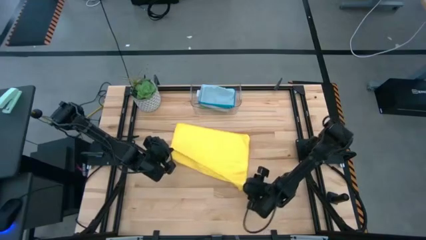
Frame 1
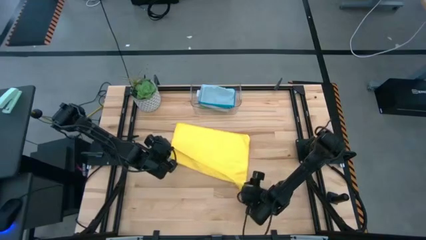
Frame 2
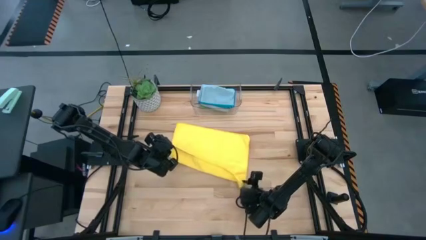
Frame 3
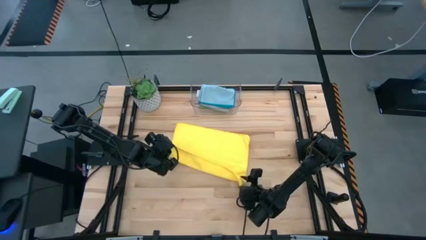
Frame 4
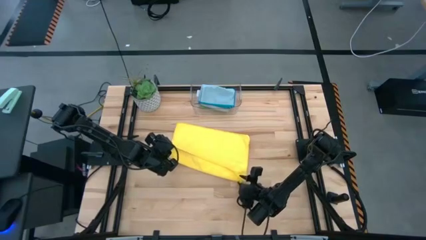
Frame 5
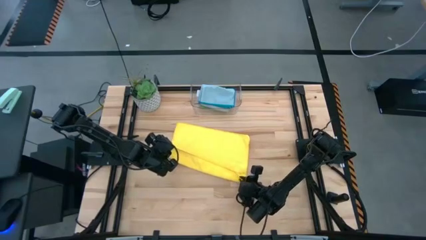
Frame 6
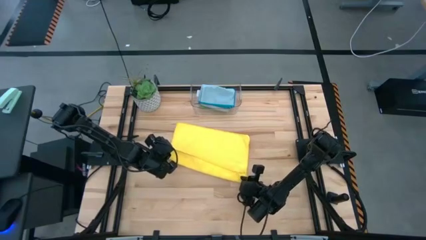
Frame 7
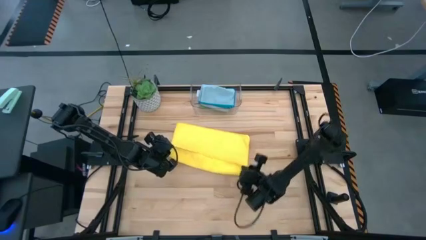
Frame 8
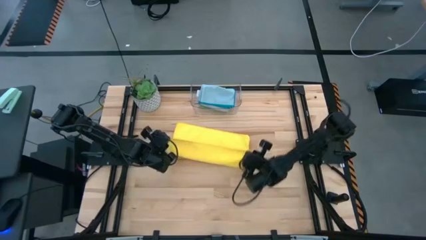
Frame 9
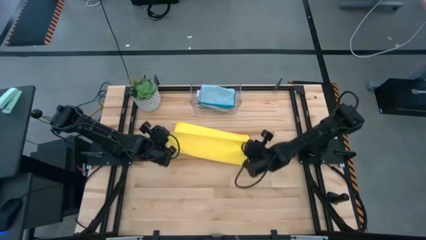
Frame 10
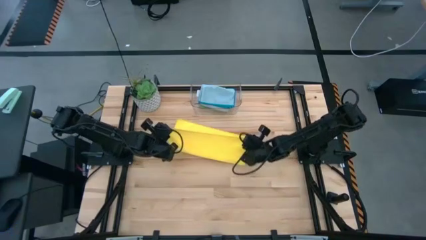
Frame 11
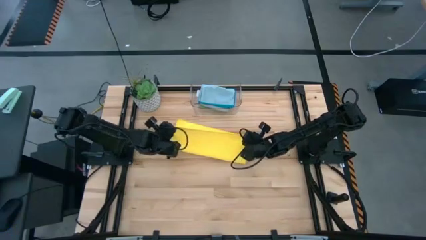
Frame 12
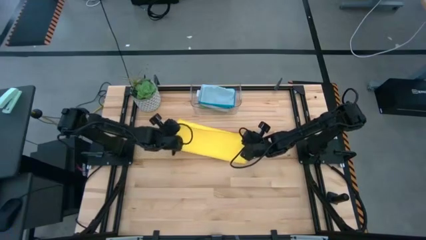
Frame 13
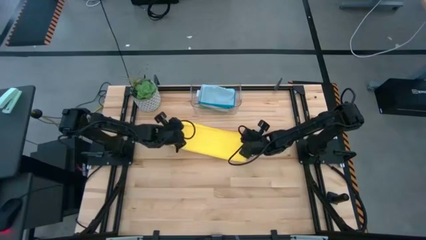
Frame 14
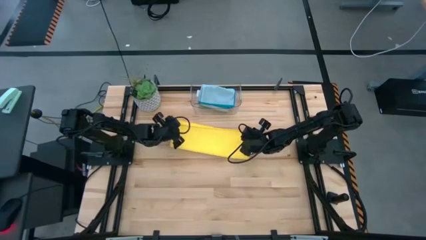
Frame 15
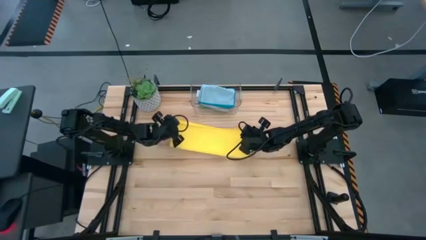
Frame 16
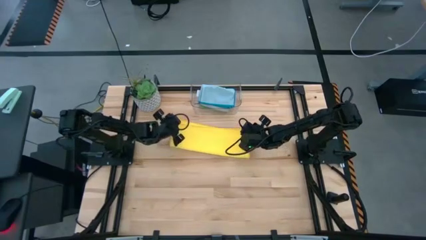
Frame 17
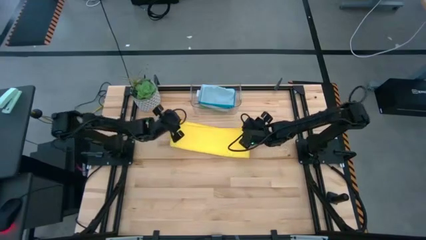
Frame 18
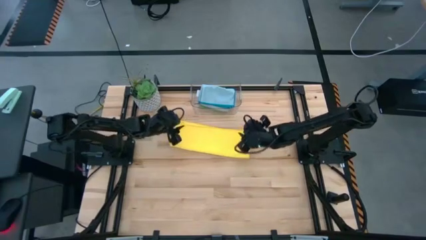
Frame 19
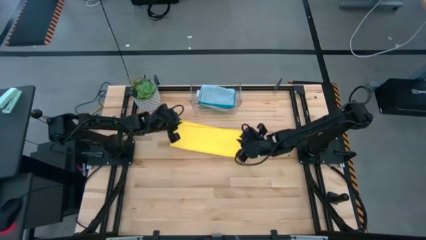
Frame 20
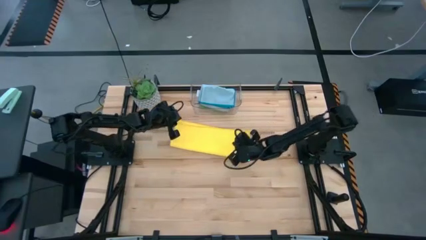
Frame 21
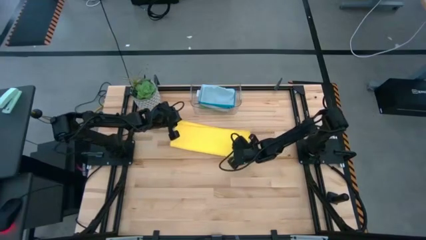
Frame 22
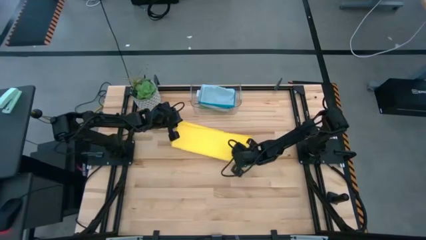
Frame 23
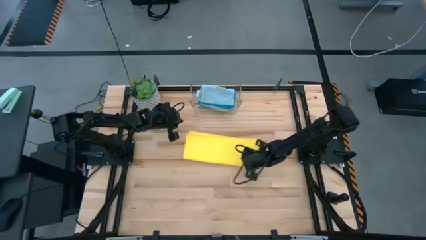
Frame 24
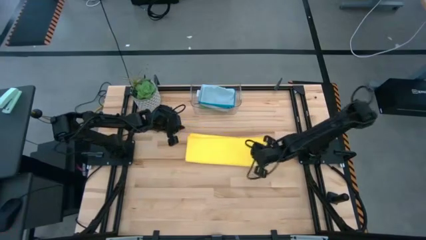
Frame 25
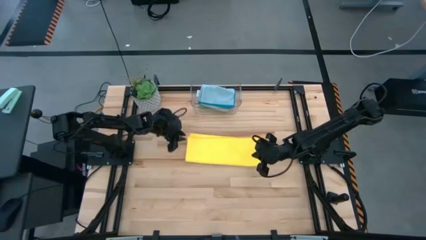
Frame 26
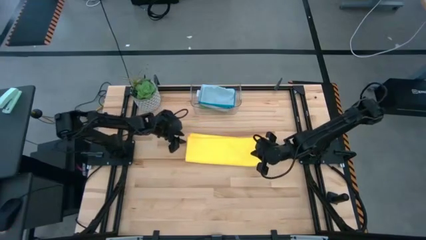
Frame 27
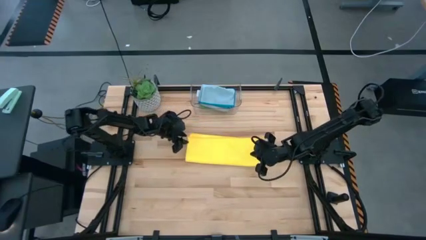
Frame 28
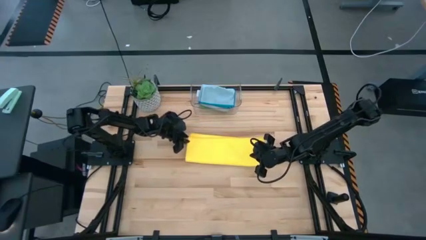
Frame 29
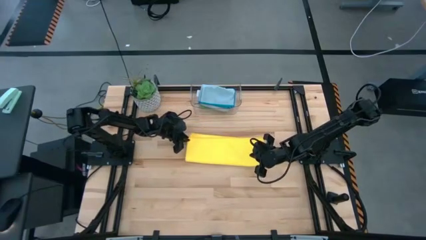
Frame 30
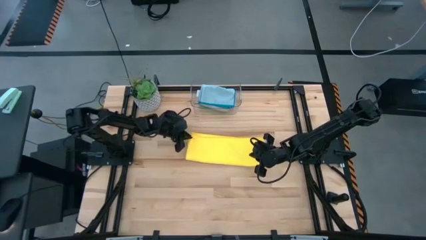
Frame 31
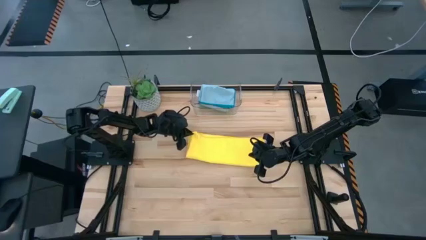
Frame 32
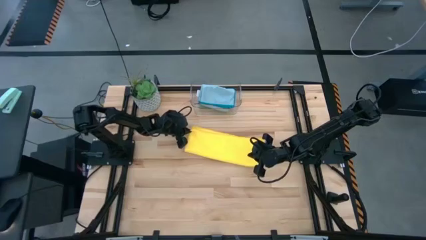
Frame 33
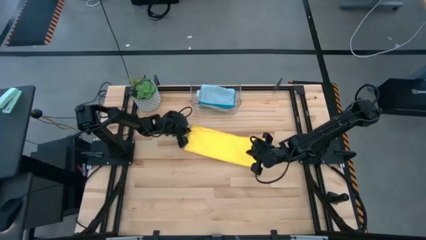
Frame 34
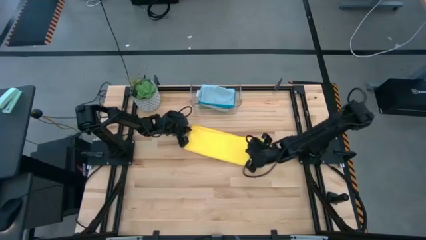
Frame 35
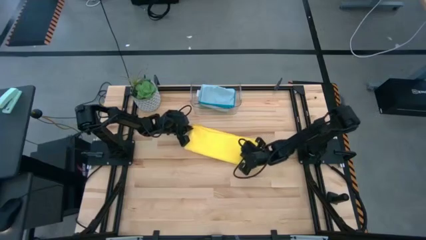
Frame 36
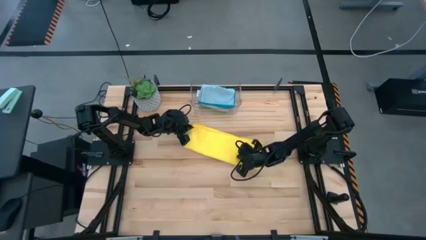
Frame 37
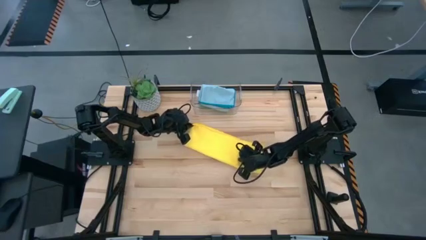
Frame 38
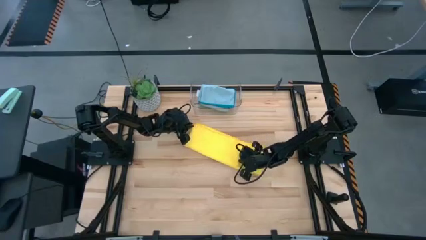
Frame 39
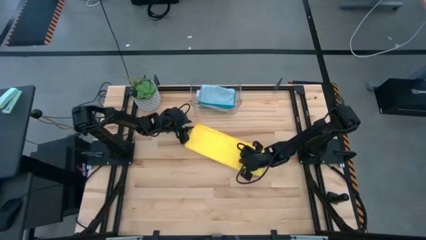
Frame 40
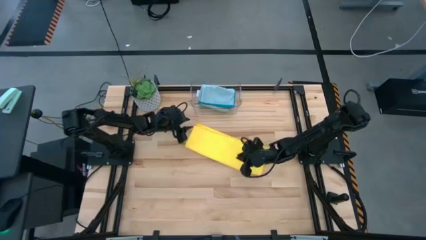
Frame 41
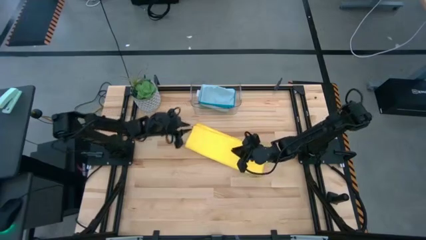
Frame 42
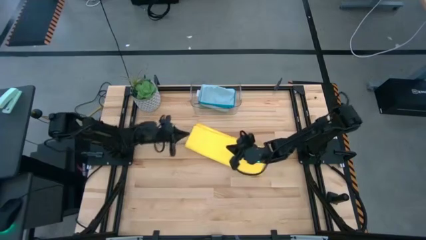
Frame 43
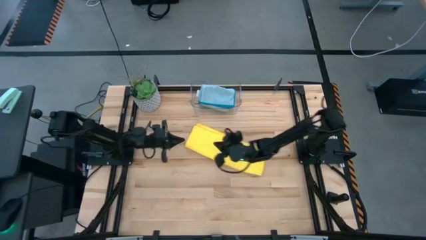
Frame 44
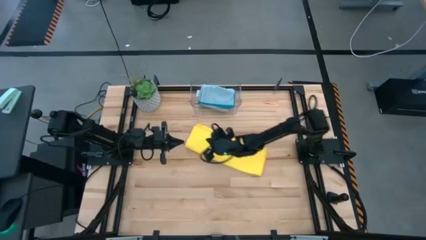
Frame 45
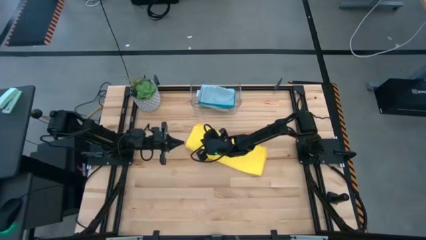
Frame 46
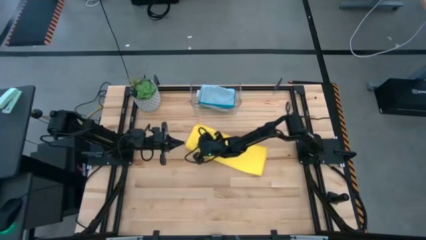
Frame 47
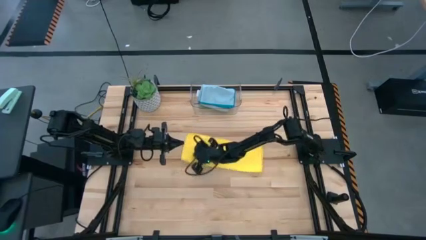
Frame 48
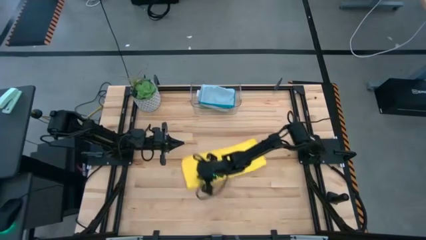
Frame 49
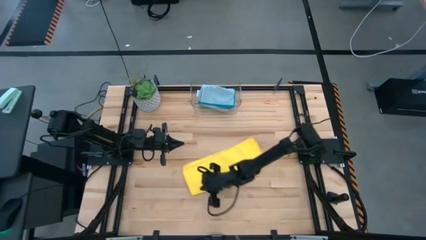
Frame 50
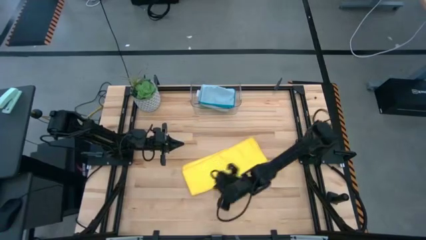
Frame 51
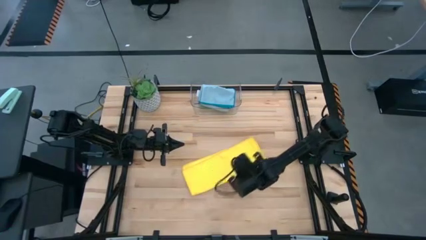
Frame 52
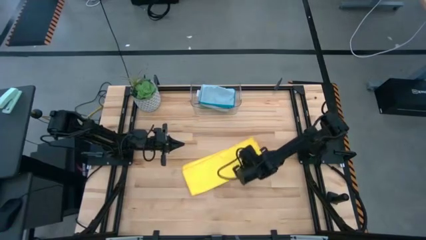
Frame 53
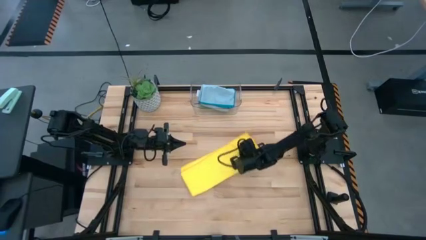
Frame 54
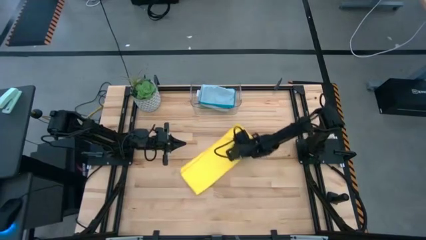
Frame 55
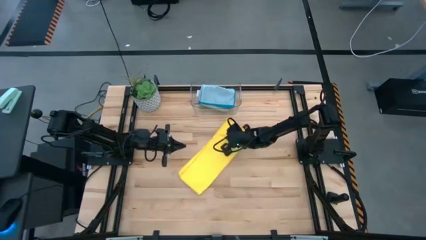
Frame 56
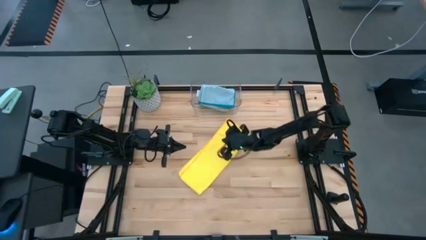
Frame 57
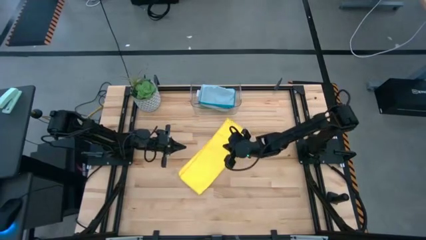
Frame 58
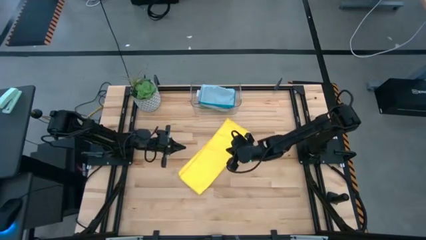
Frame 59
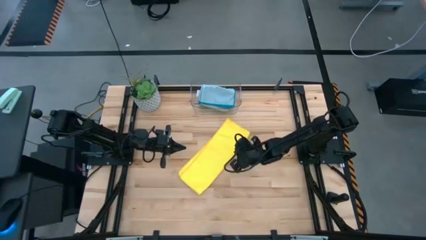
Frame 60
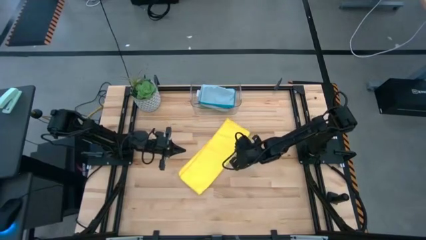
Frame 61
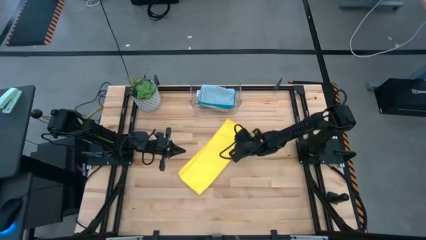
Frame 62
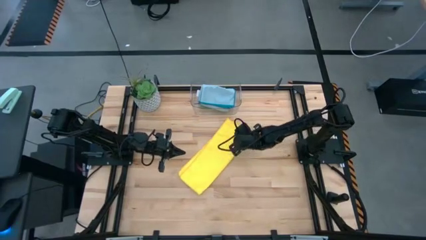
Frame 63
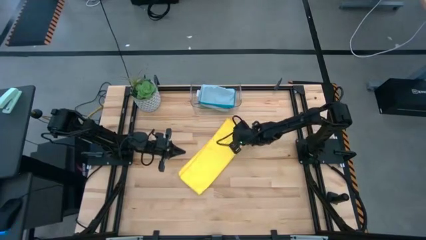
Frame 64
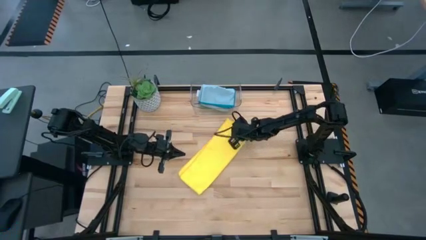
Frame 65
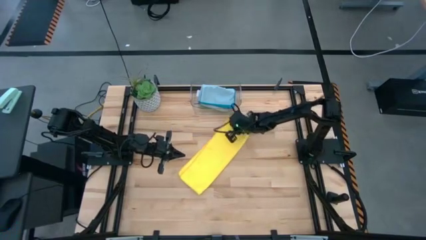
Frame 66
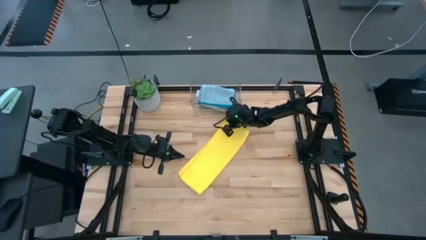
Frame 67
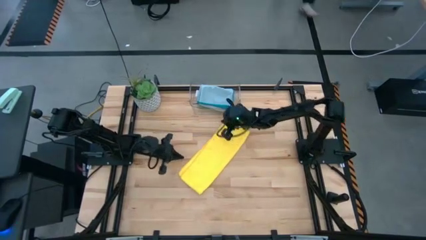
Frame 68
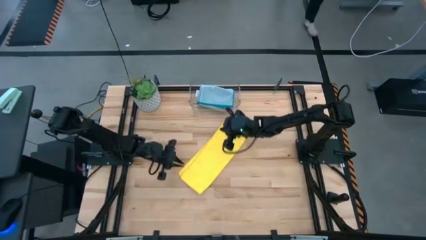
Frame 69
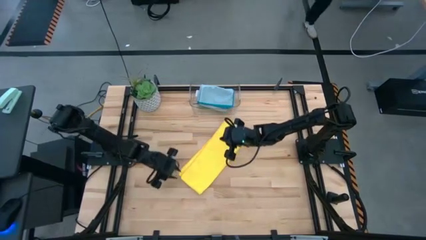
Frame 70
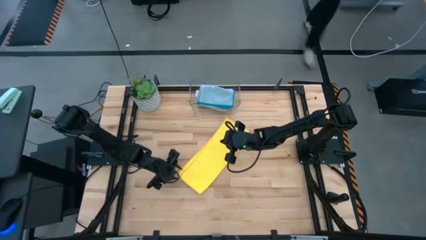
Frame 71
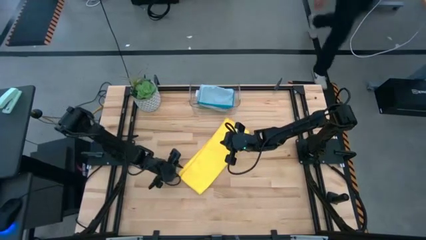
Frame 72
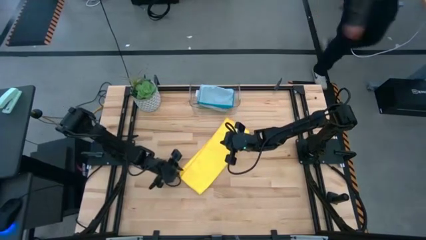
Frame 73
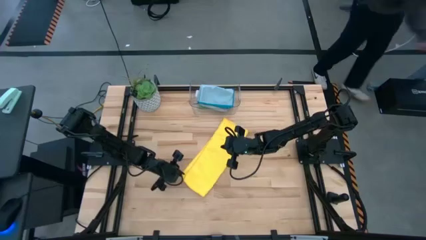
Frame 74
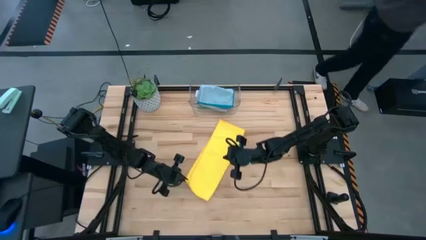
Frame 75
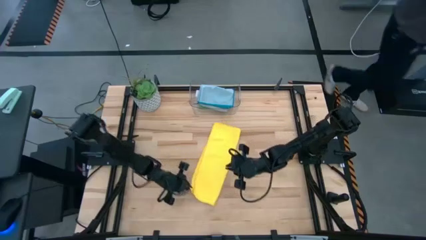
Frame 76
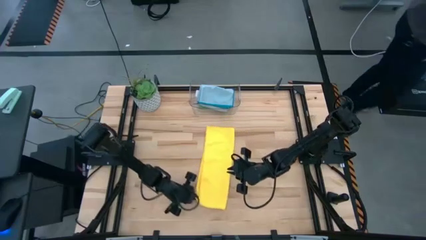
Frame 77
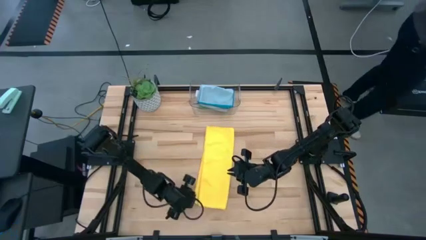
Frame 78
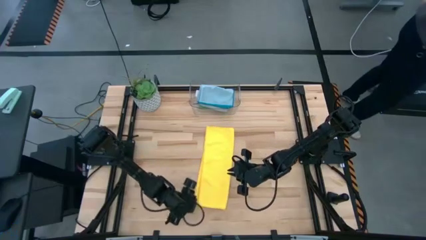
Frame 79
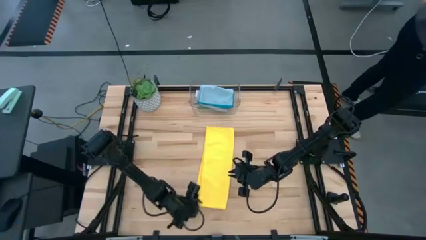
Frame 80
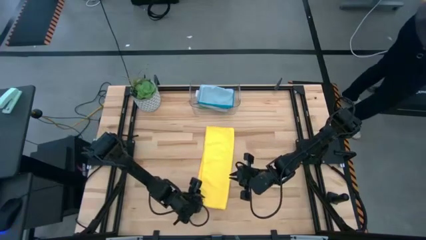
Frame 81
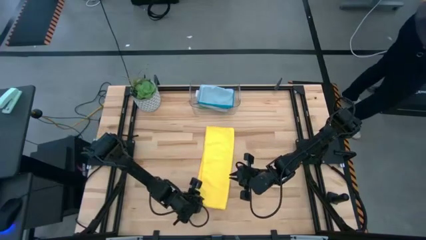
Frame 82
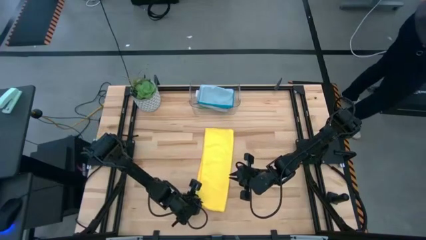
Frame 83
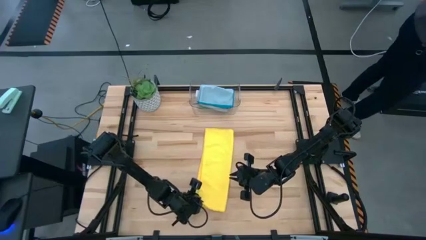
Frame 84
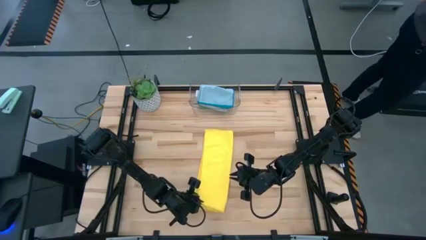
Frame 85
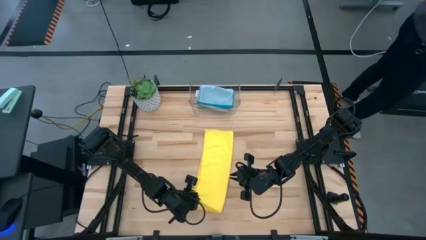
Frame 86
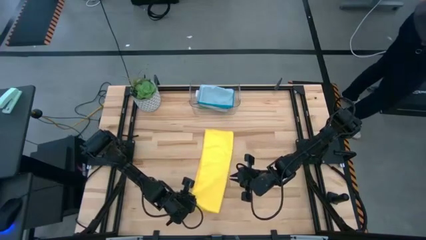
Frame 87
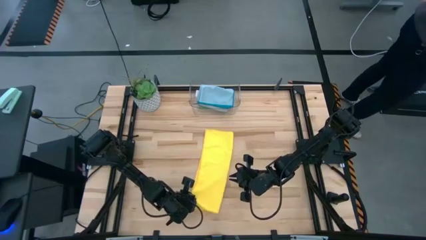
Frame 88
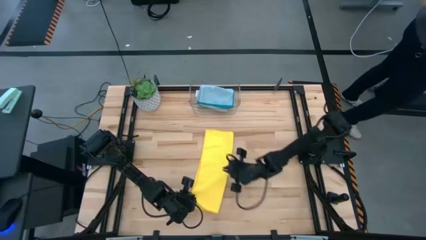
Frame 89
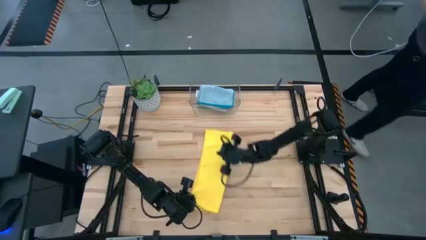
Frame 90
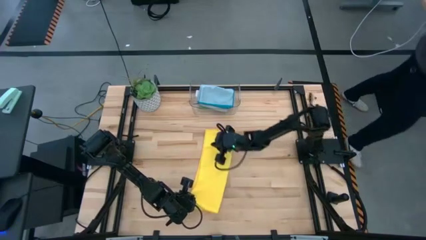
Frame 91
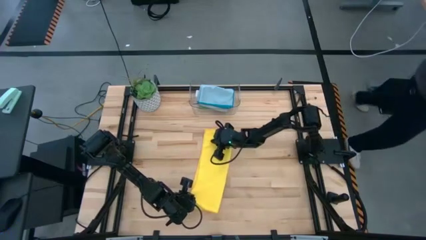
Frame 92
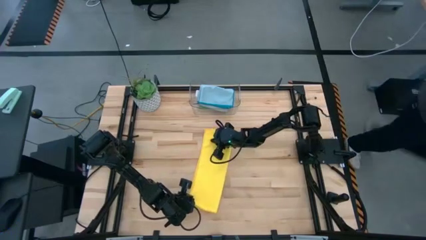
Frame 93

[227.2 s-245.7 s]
Task: Fold microfiber towels
Fold the yellow microfiber cloth
